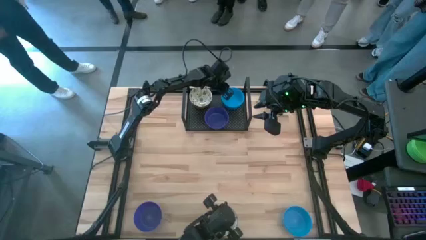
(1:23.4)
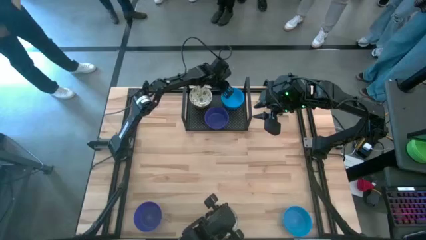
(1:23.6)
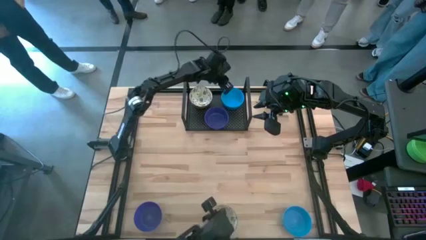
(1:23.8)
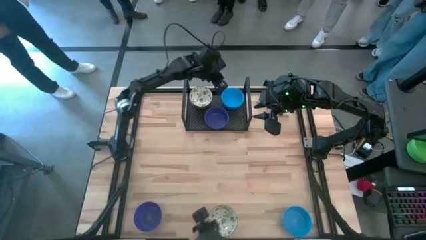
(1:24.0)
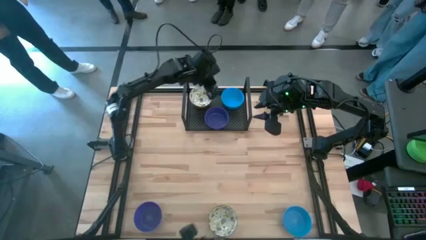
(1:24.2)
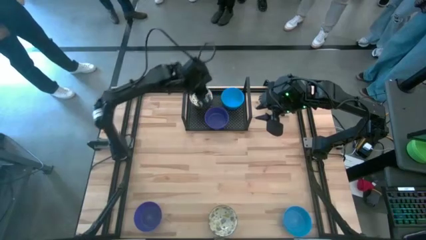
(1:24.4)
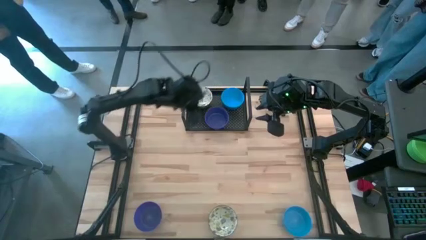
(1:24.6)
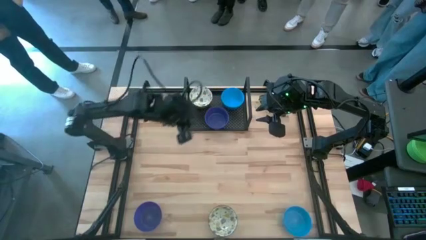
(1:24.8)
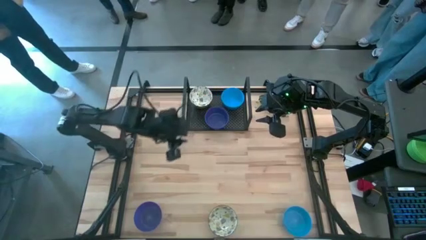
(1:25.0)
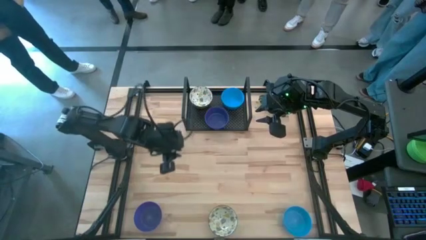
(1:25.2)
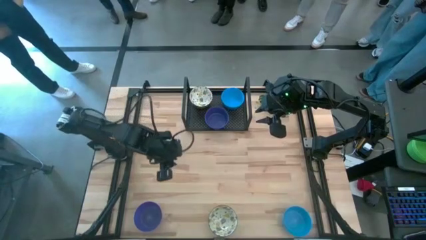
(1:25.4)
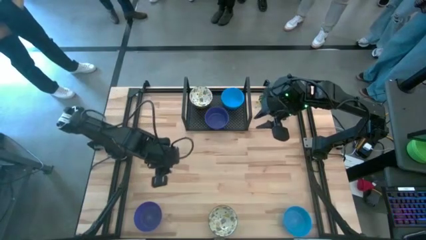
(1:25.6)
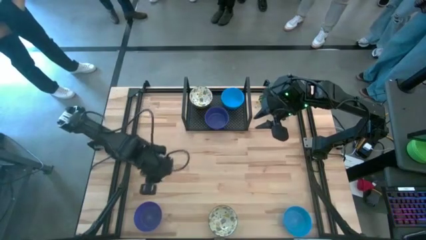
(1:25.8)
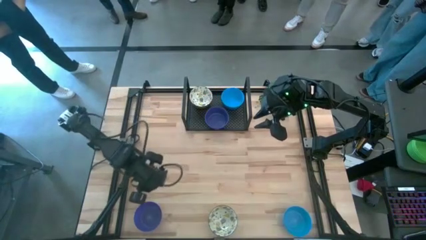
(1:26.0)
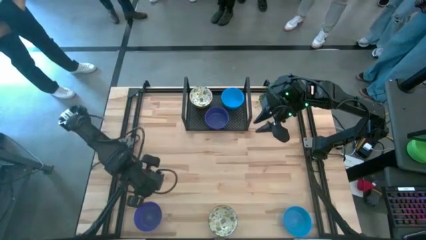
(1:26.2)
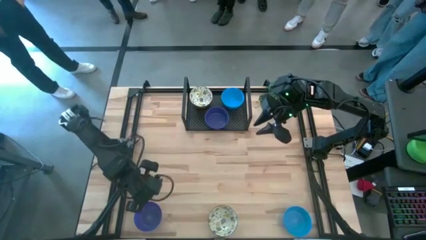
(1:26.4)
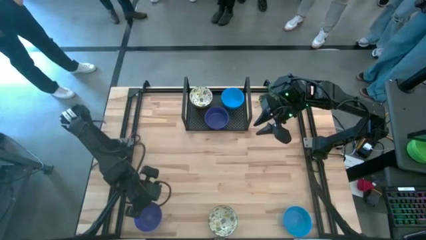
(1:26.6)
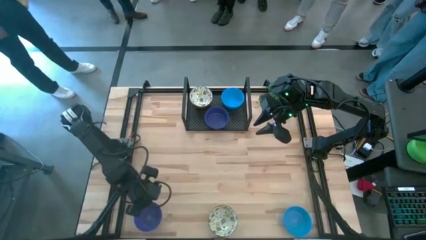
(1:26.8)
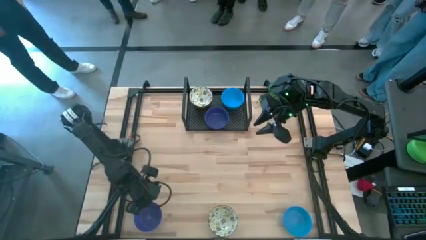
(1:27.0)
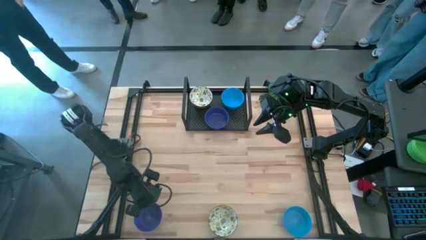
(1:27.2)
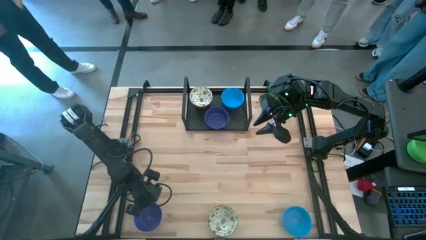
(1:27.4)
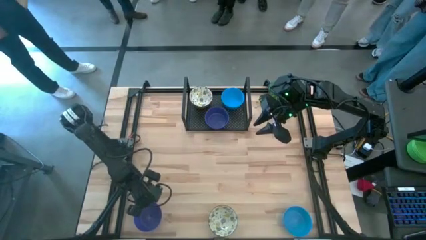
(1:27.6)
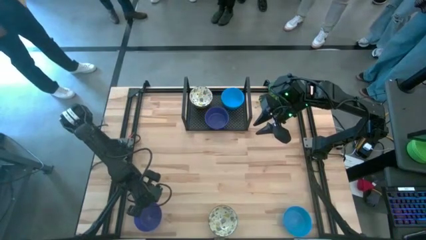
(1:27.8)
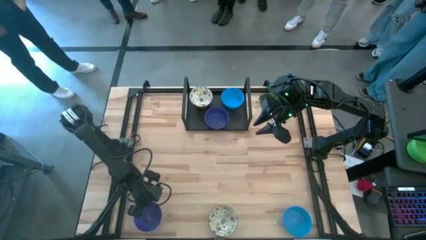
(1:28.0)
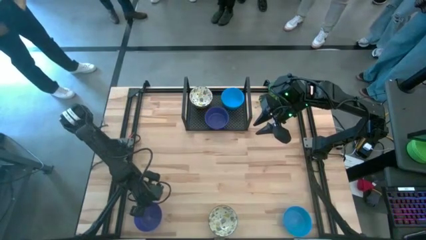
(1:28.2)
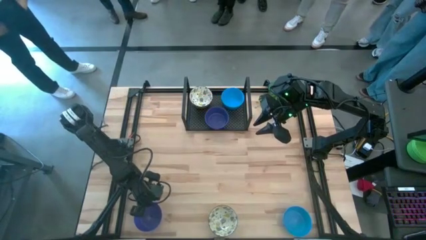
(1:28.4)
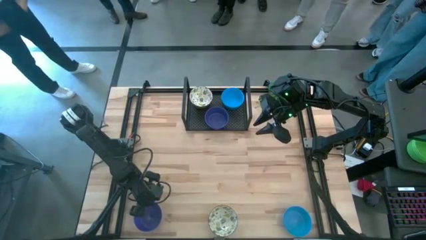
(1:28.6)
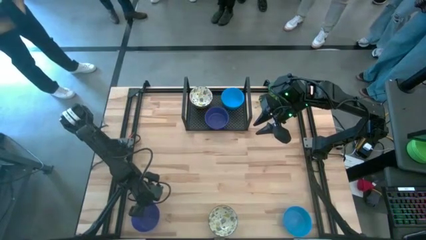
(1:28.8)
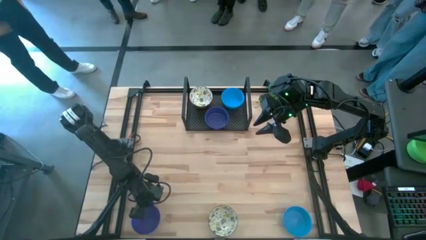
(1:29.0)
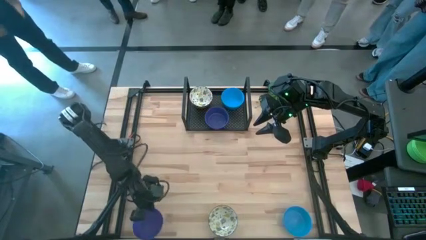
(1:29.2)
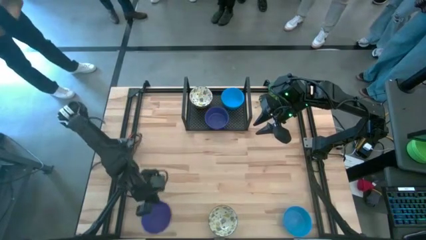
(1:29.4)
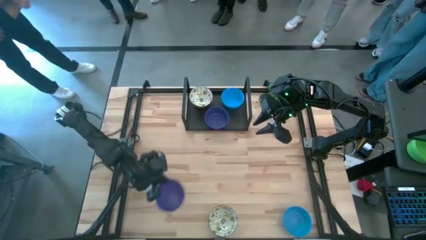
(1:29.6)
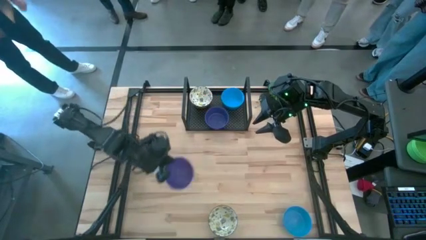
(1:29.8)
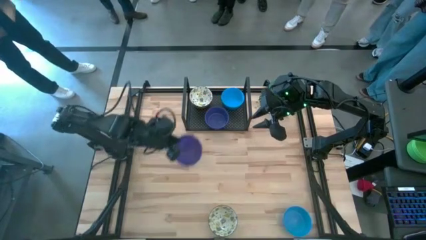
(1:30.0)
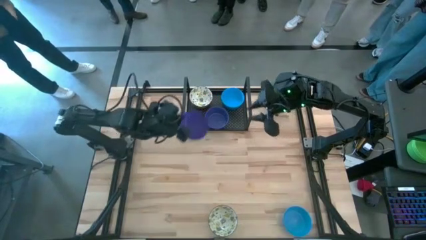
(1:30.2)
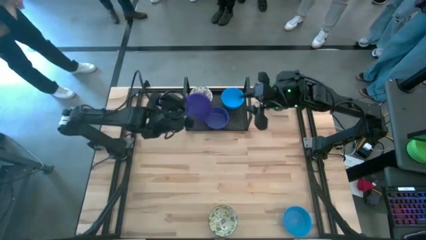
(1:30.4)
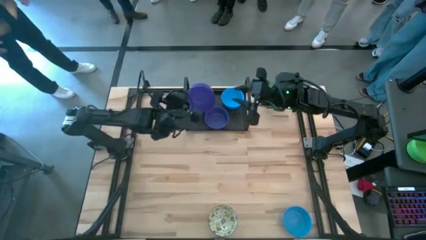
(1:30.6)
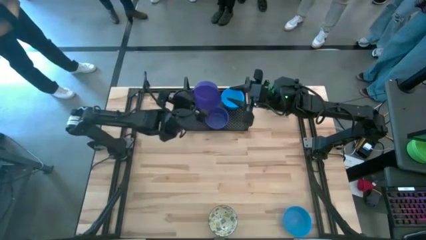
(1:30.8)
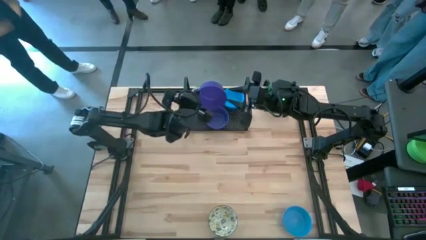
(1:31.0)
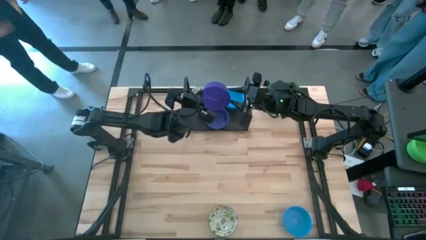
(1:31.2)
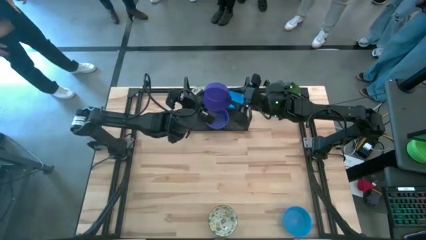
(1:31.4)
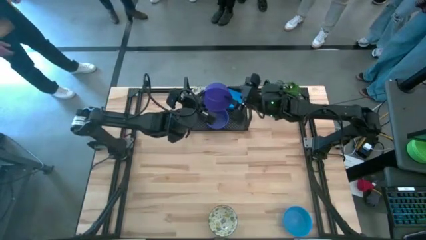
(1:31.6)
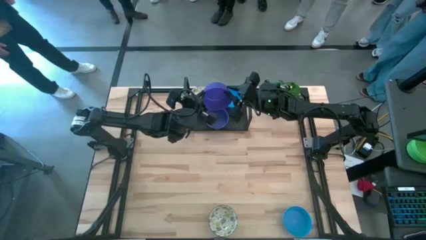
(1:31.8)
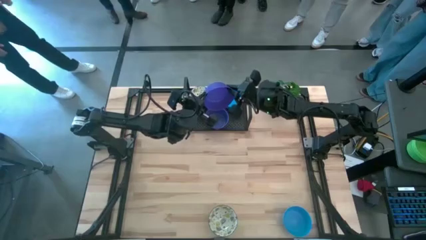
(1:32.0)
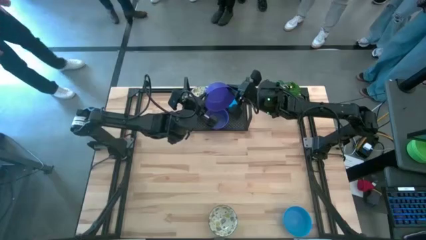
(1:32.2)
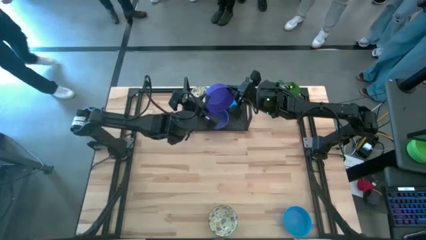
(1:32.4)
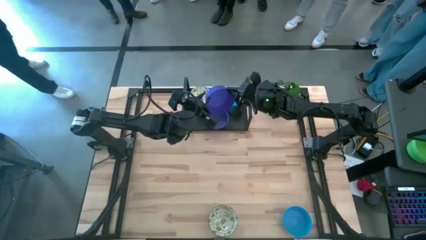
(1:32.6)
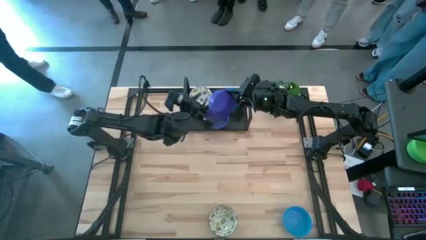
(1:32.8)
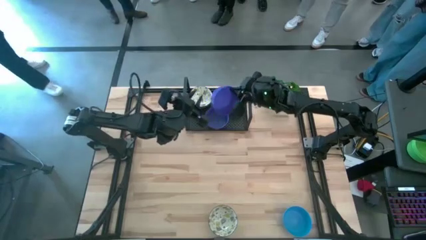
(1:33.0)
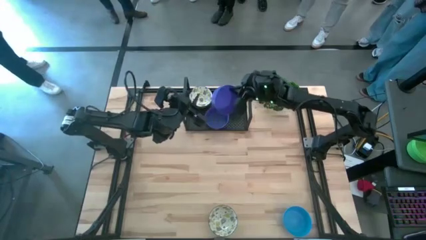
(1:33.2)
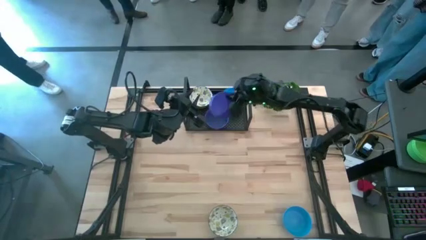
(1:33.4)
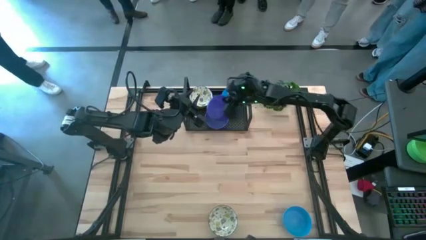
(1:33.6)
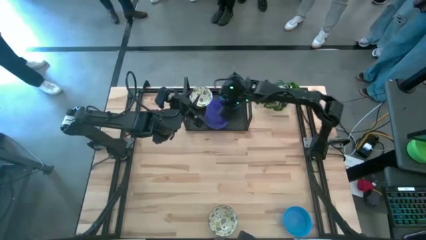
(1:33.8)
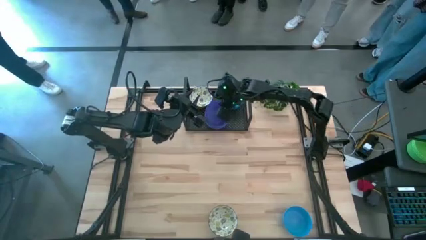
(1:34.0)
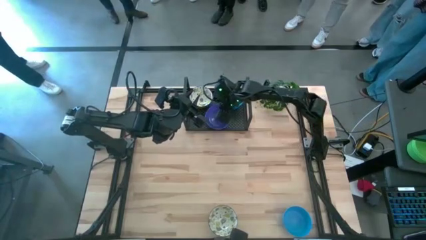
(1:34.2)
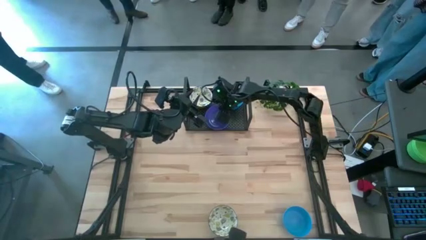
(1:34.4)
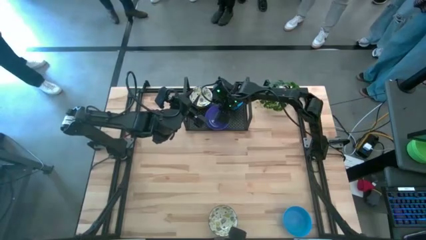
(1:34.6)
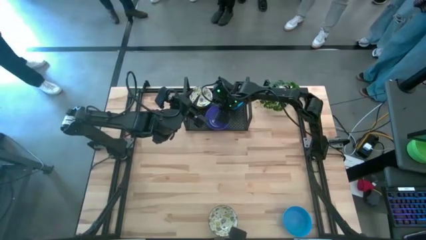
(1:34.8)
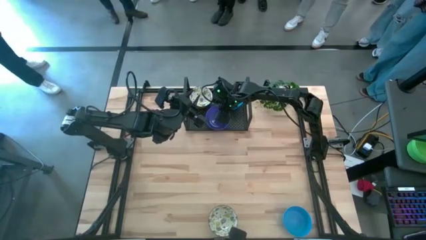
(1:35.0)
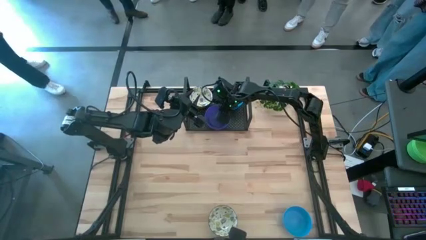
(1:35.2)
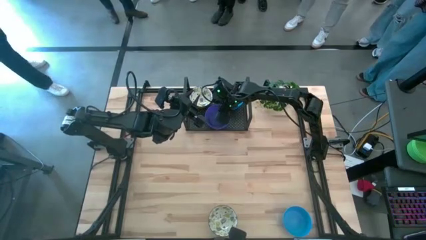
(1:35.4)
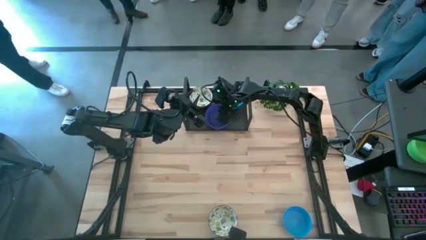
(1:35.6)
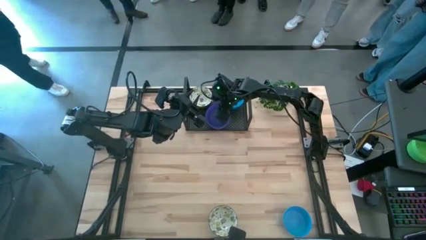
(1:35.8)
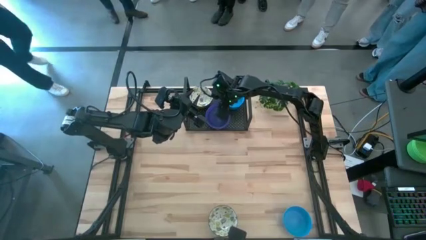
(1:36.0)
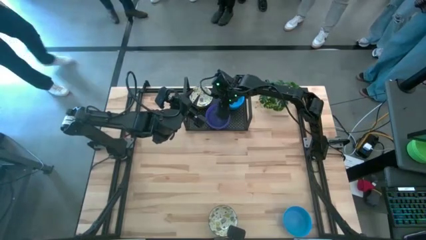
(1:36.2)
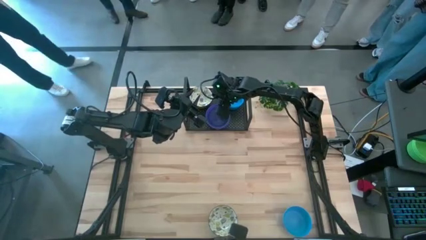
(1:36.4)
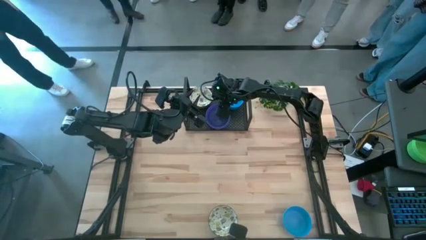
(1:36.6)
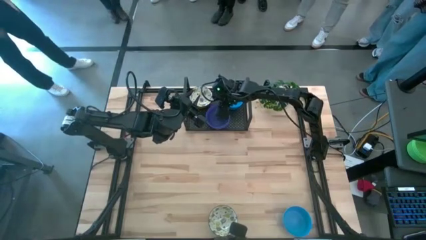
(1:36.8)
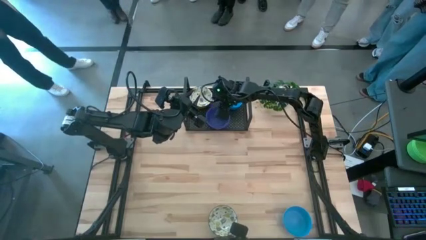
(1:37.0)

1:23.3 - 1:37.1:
Task: Pick & Place Mini bowls
Stack the purple bowl on top of the purple bowls on the shelf

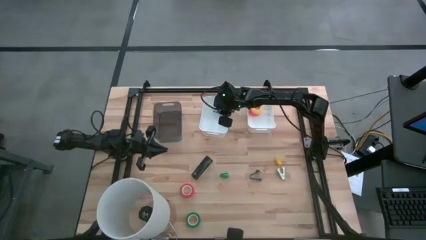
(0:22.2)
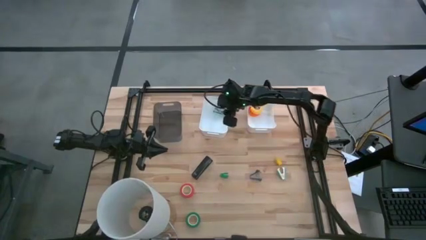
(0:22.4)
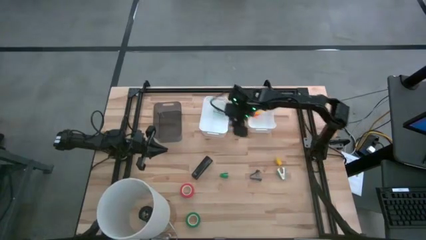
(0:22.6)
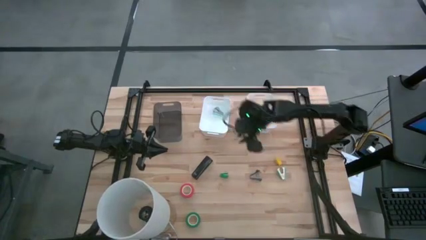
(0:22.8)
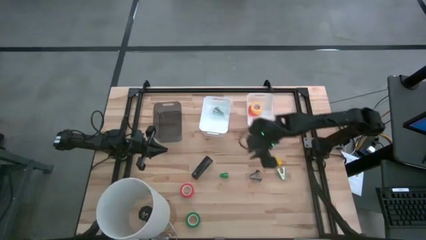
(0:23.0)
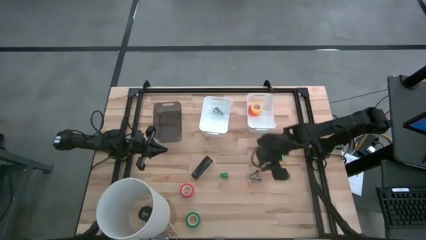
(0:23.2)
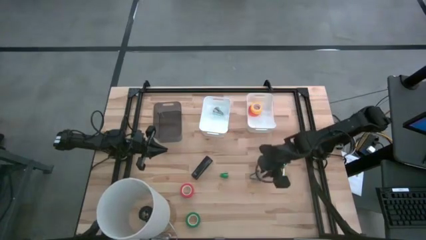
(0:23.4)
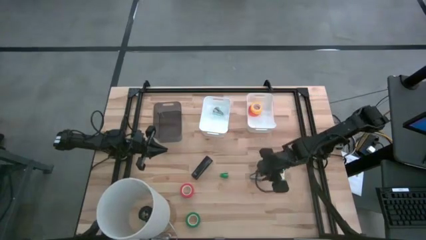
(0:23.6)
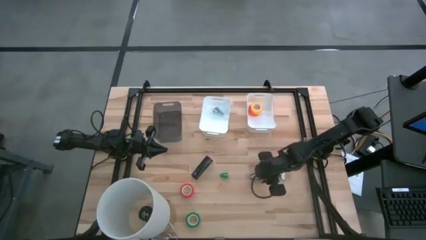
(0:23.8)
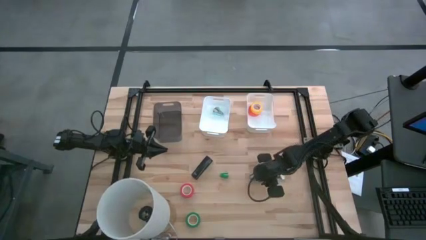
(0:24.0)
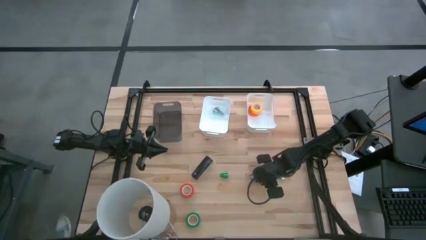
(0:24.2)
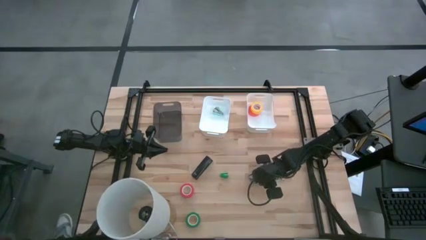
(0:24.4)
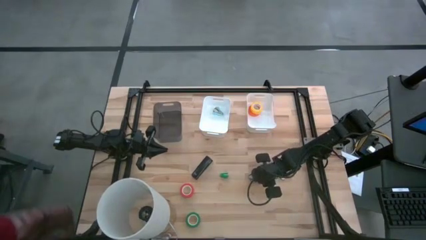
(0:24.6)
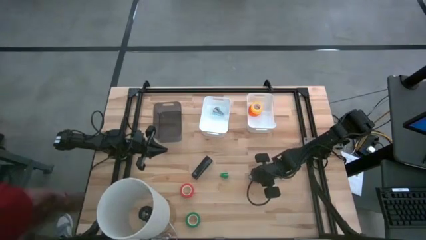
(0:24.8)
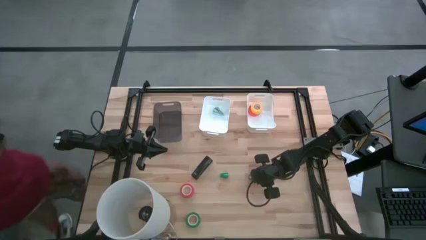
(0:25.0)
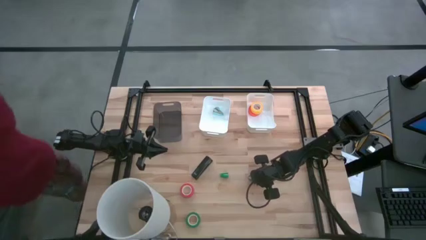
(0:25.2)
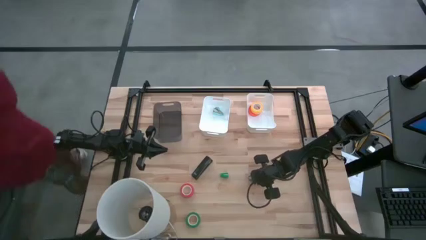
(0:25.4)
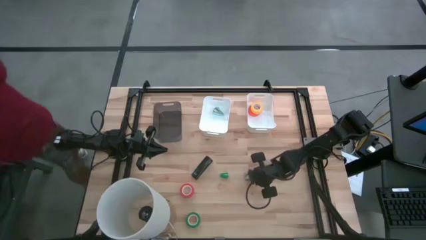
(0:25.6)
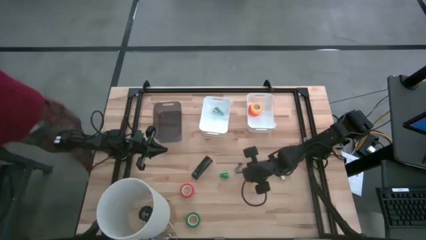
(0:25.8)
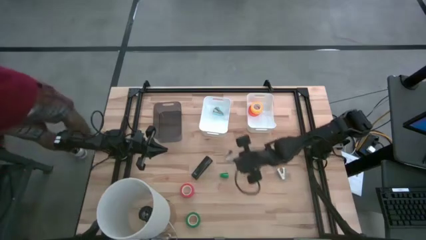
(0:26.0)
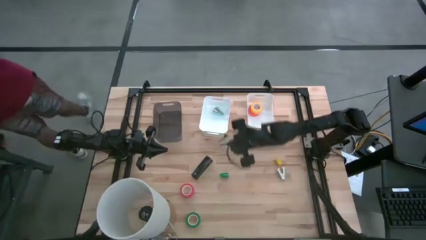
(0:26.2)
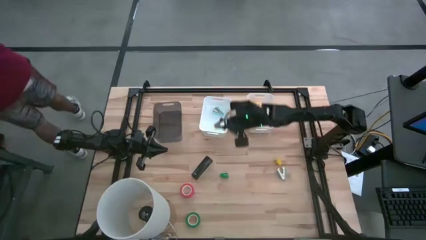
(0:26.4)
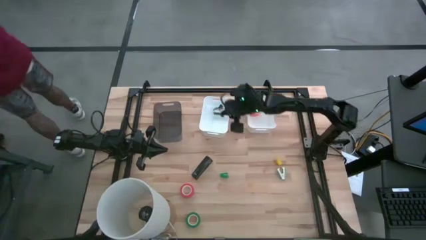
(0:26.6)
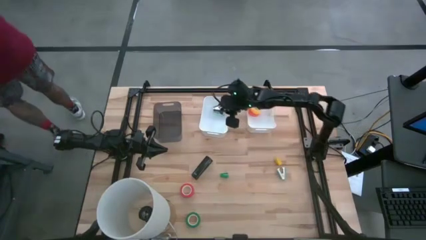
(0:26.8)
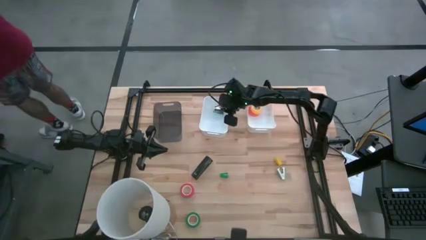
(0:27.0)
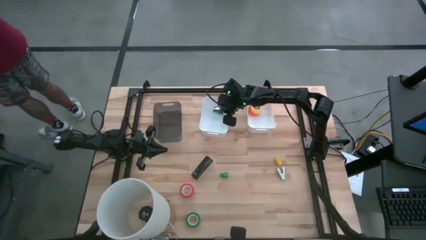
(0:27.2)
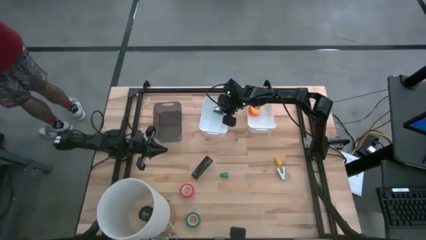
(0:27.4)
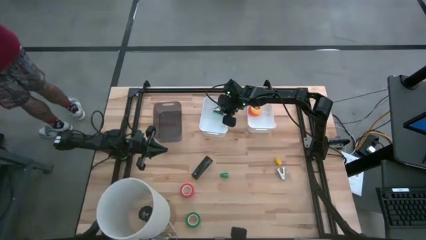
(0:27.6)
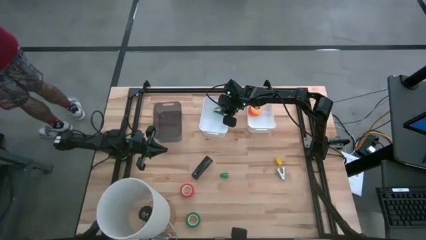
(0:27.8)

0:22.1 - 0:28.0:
Task: Pick and place Stapler, Stapler remover, tape
Put the black stapler remover into the left white bin
